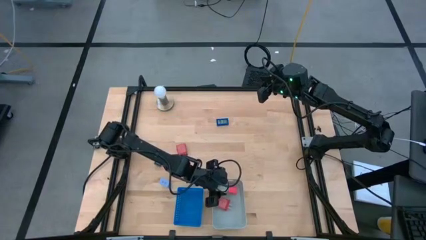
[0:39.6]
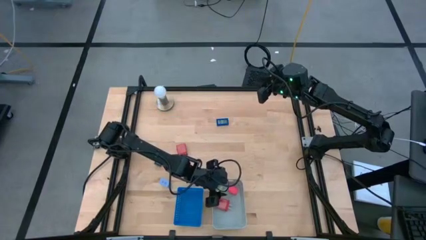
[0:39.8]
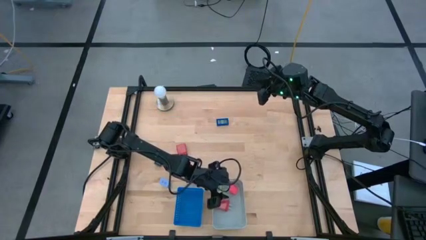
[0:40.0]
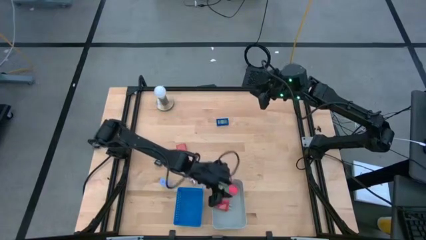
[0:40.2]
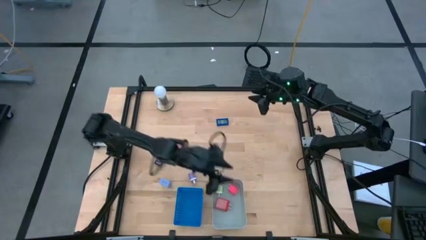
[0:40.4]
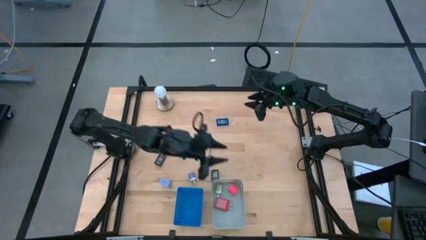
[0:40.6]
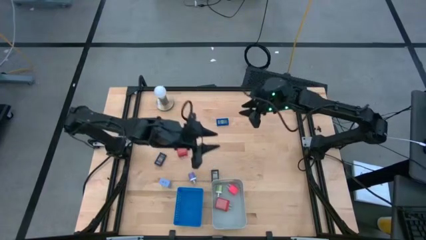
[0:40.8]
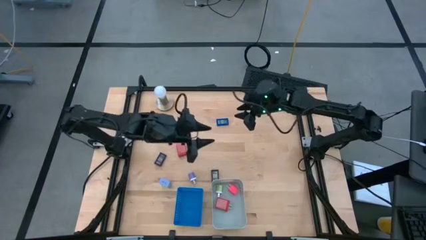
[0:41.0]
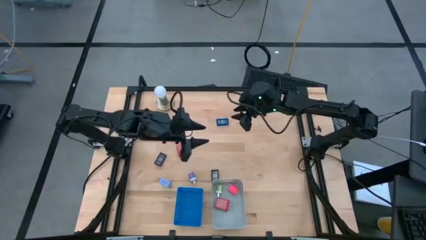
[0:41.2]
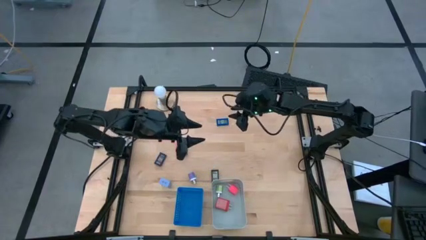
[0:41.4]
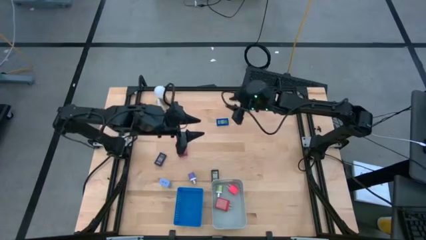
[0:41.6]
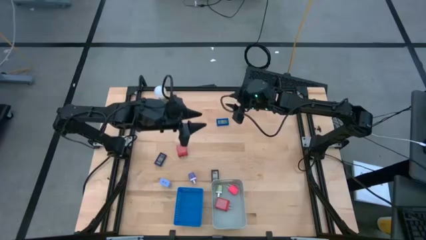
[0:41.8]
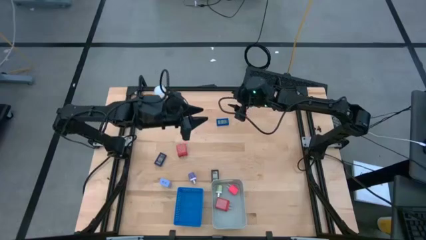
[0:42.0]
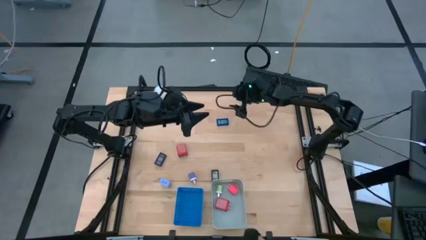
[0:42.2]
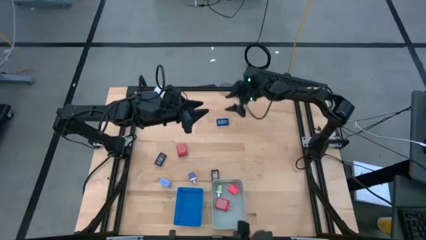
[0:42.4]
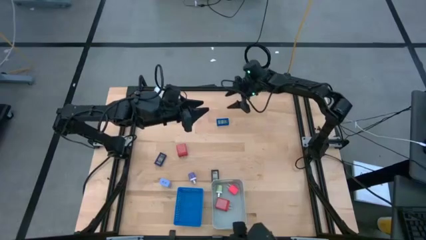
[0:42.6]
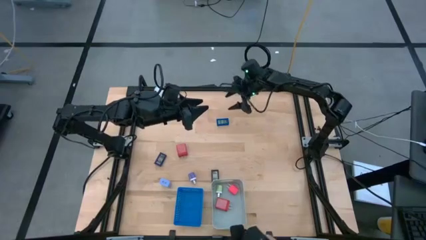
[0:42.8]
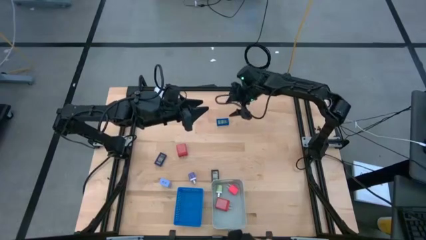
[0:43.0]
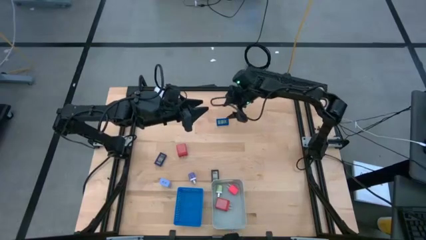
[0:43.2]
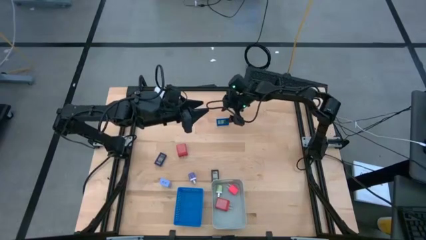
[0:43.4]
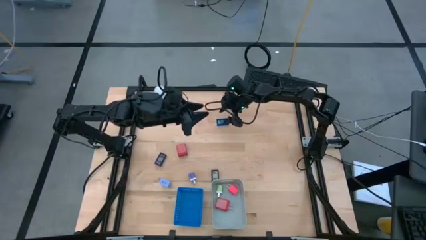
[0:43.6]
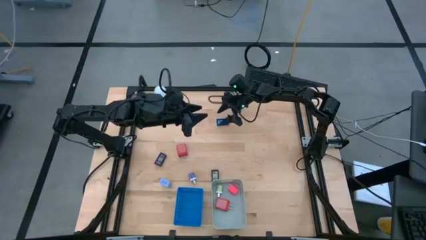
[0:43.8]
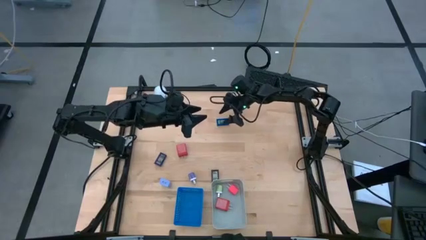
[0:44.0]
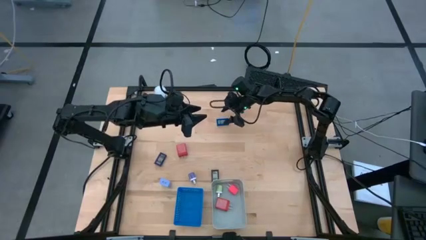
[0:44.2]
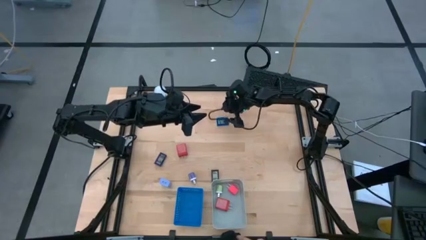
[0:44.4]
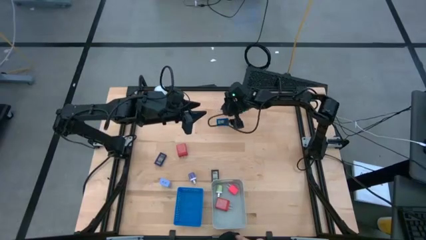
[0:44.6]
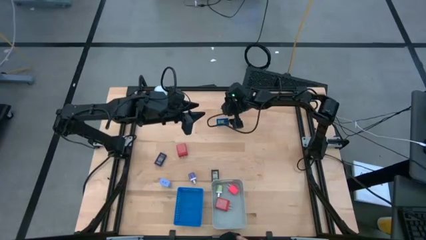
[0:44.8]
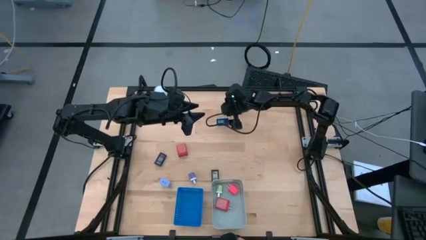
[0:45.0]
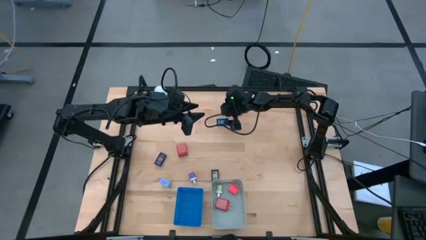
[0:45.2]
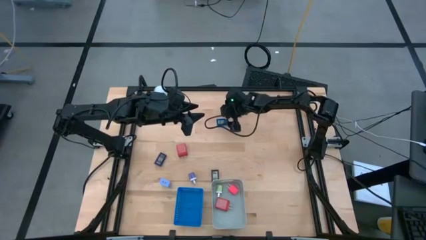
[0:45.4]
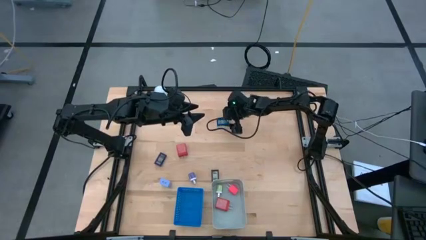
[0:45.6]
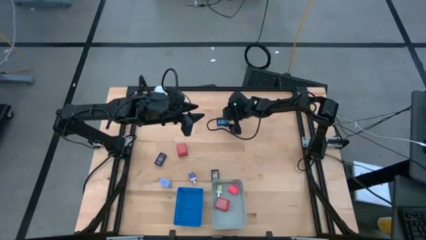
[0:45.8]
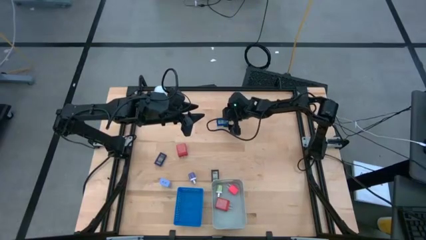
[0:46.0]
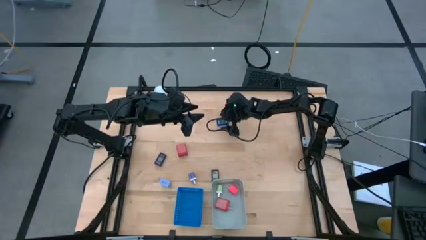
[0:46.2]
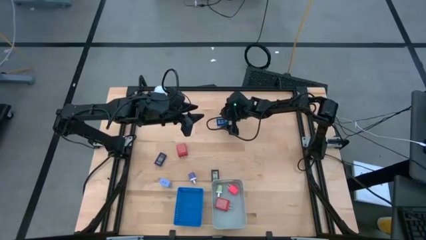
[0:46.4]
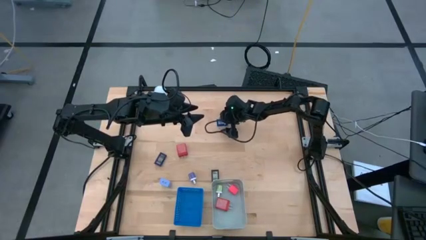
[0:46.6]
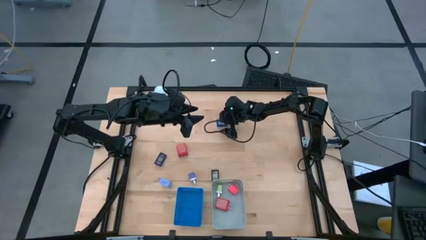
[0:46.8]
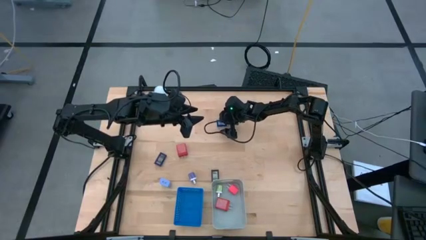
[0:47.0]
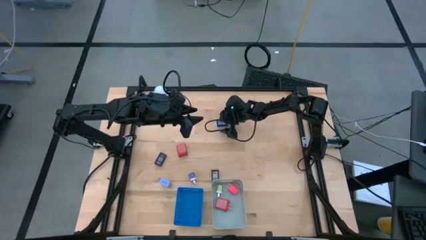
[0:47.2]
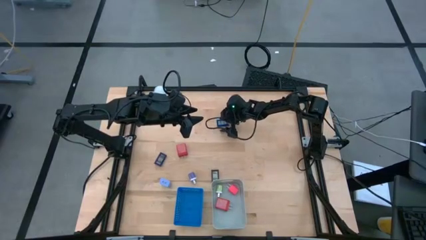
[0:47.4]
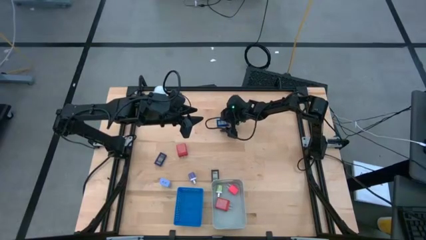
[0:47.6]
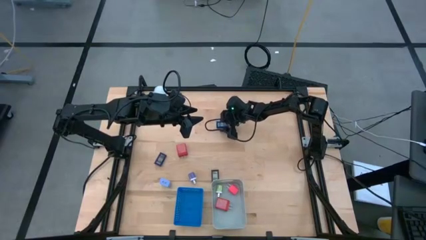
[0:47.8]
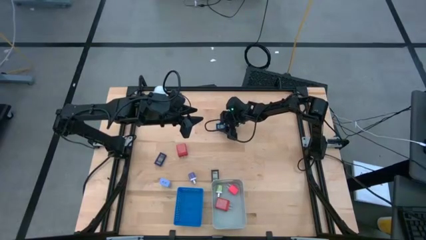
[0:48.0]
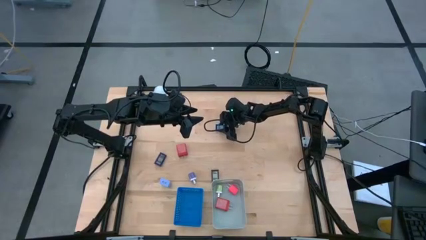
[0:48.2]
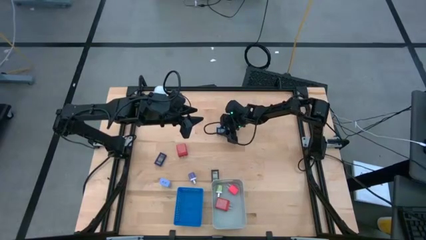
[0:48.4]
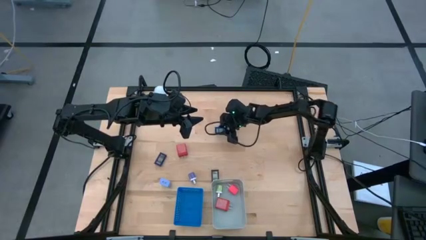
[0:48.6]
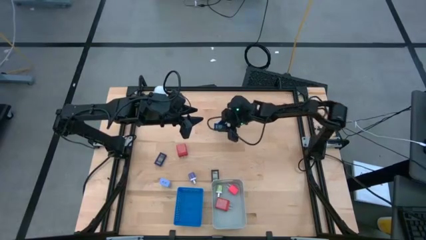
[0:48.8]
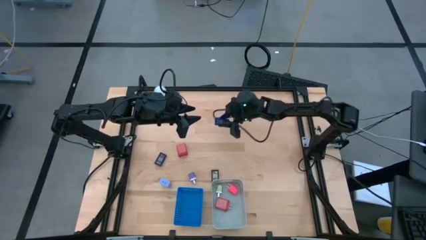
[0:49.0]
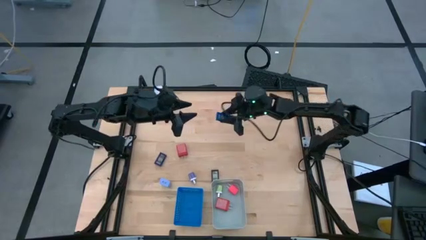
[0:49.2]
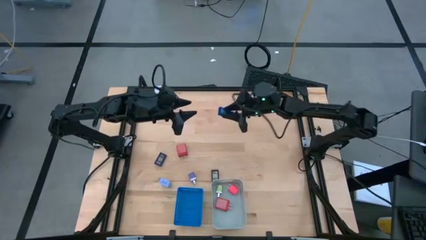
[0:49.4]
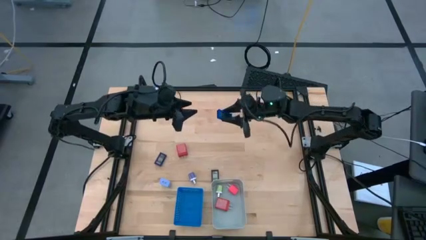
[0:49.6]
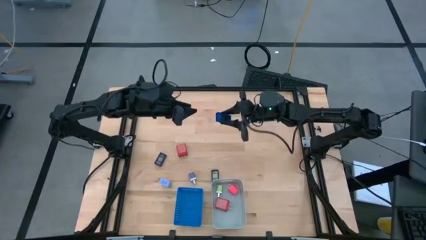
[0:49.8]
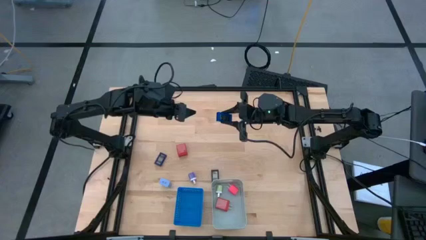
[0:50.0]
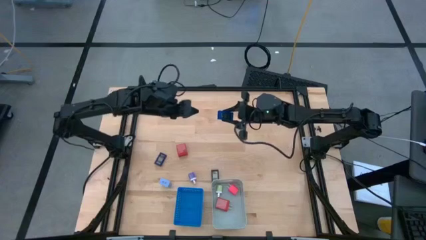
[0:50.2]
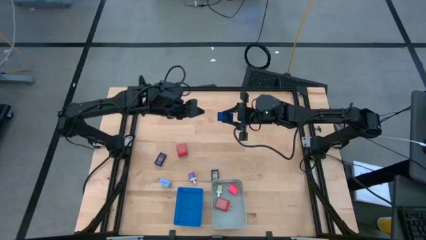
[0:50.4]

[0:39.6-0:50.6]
Task: Pick & Place Office items
Put the blue digital clock into the blue bin
